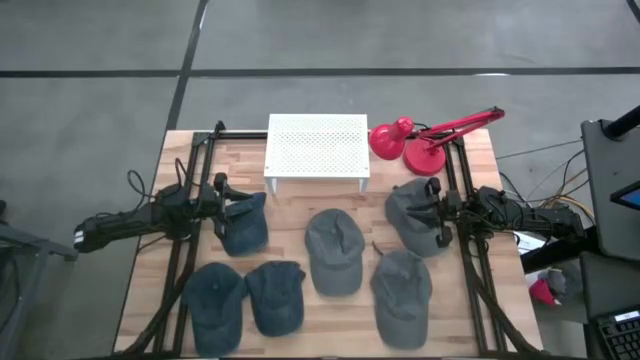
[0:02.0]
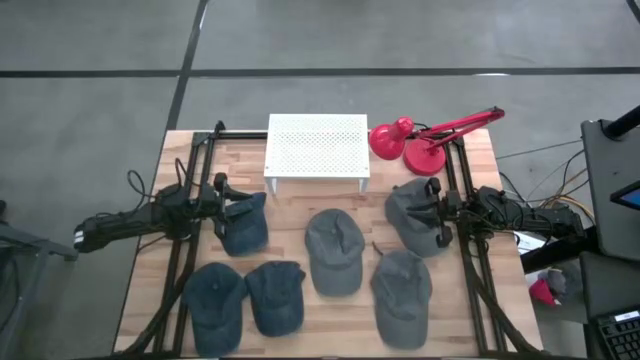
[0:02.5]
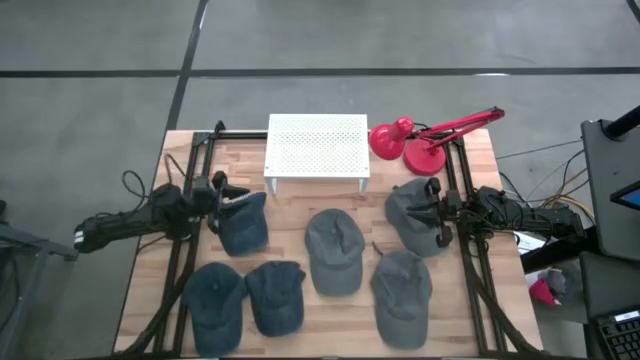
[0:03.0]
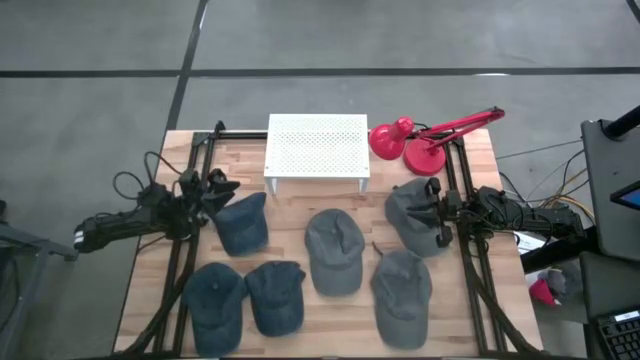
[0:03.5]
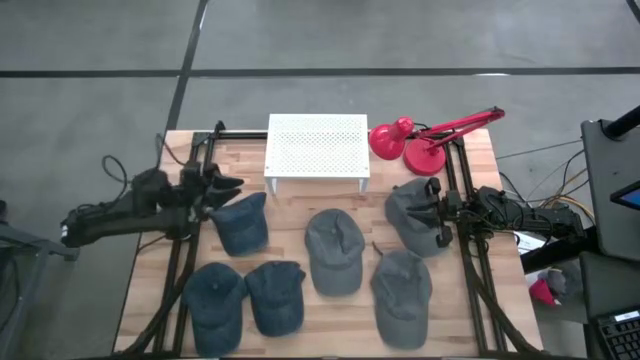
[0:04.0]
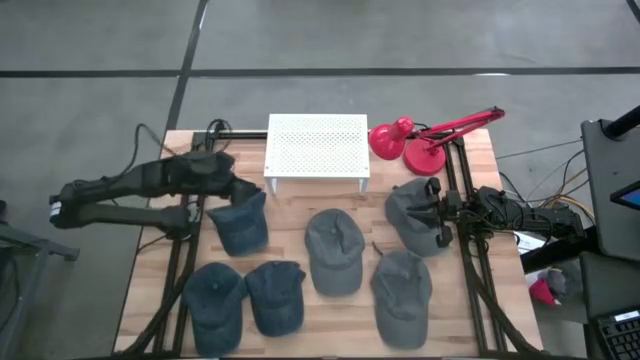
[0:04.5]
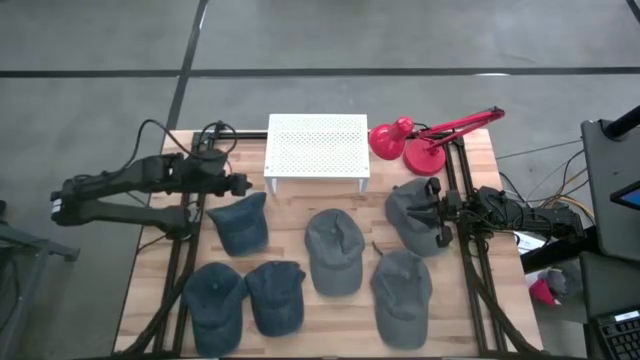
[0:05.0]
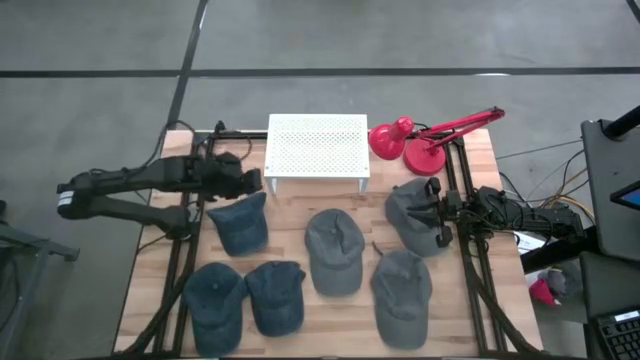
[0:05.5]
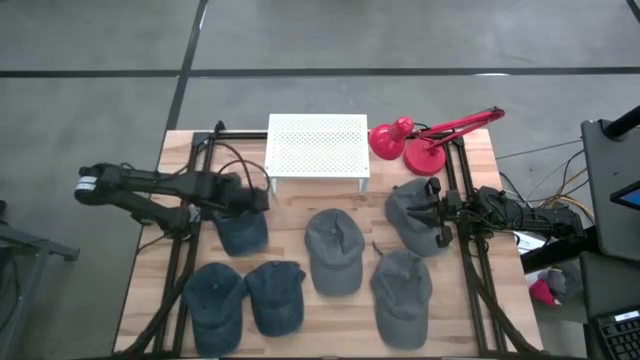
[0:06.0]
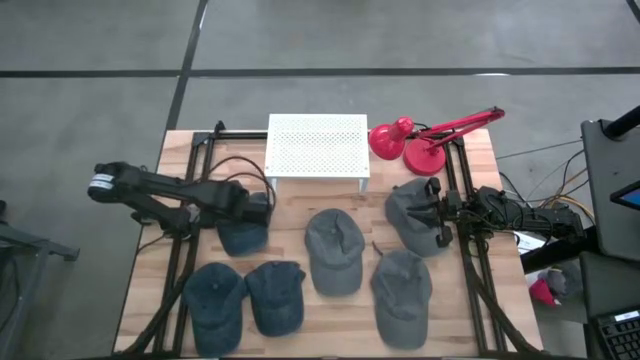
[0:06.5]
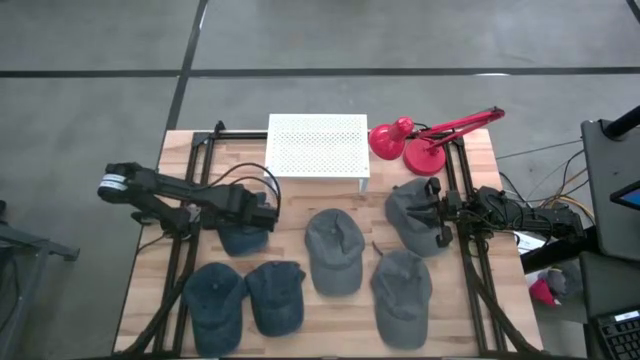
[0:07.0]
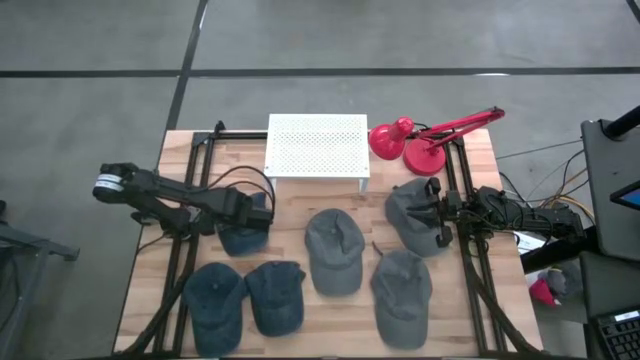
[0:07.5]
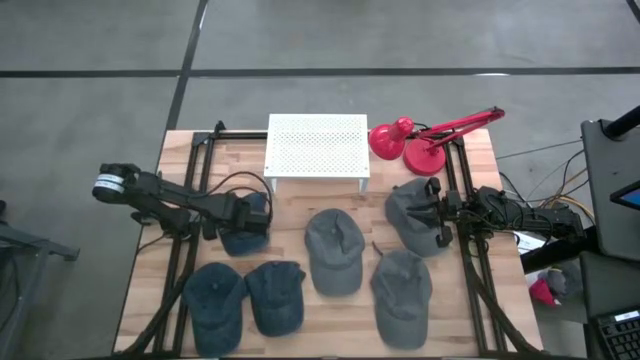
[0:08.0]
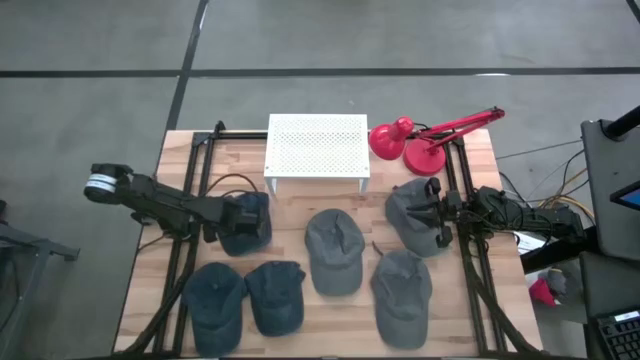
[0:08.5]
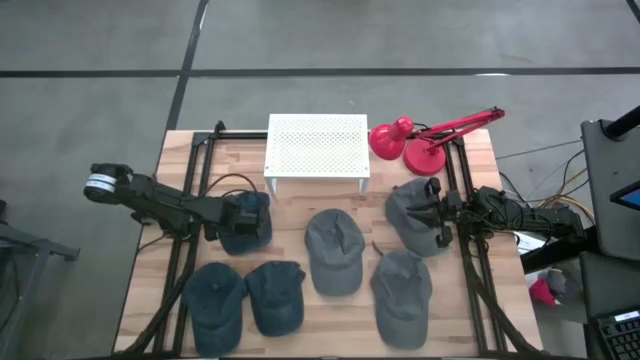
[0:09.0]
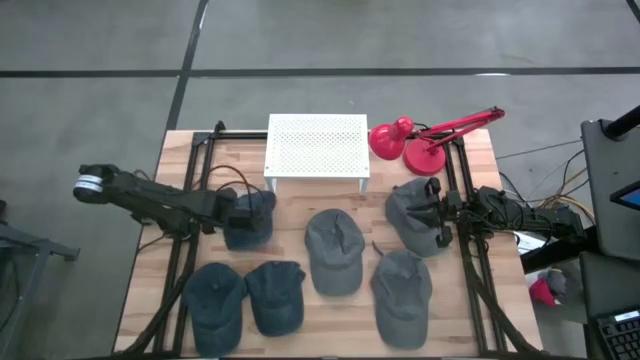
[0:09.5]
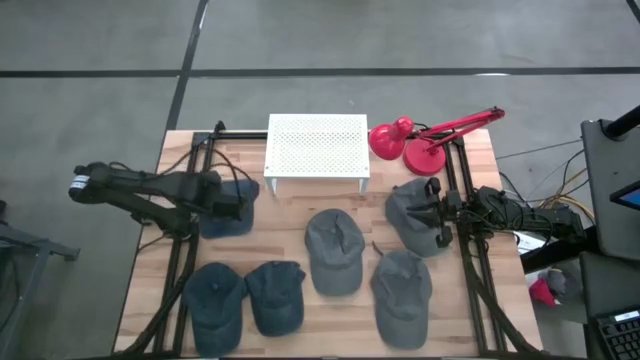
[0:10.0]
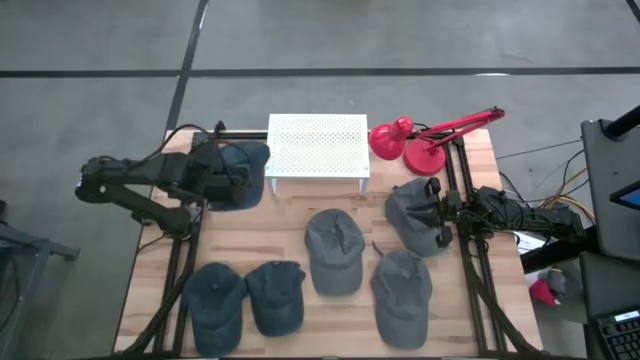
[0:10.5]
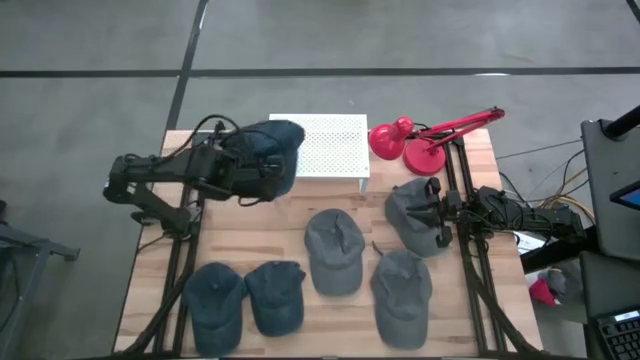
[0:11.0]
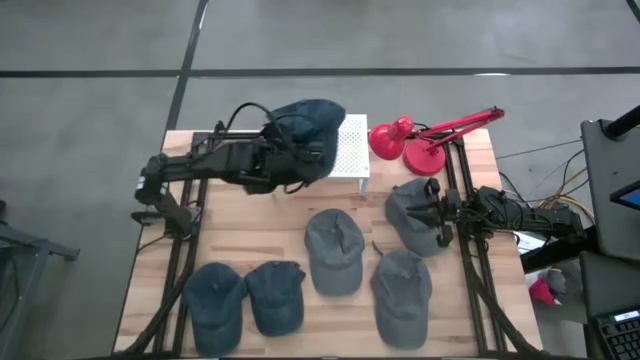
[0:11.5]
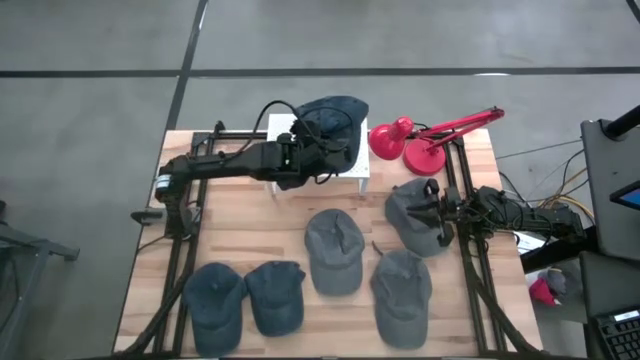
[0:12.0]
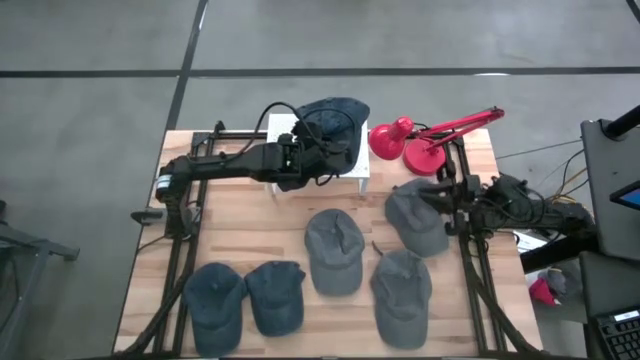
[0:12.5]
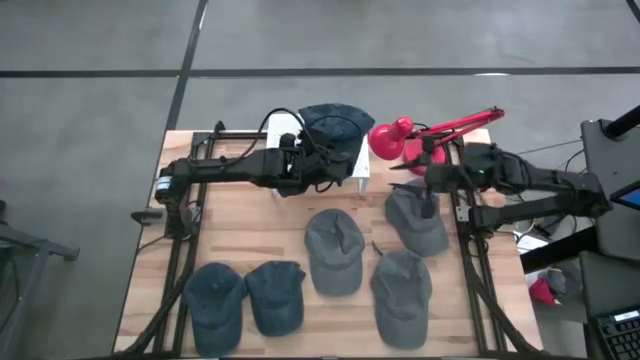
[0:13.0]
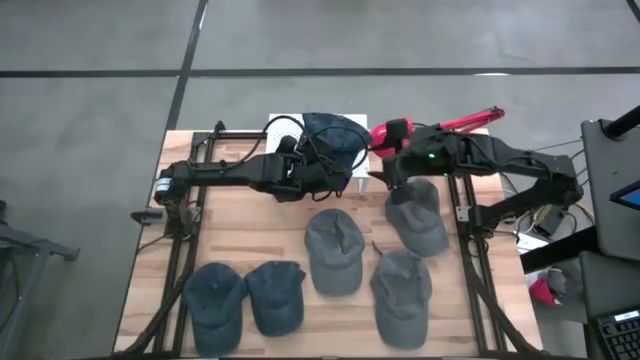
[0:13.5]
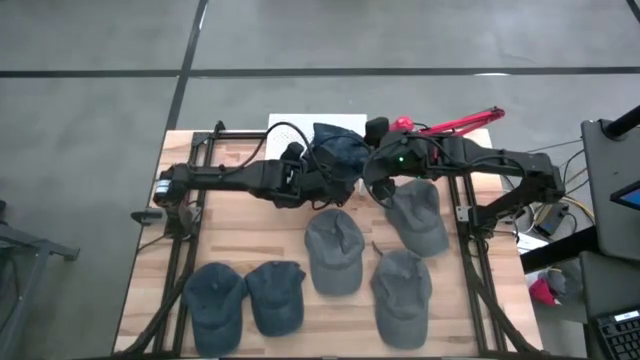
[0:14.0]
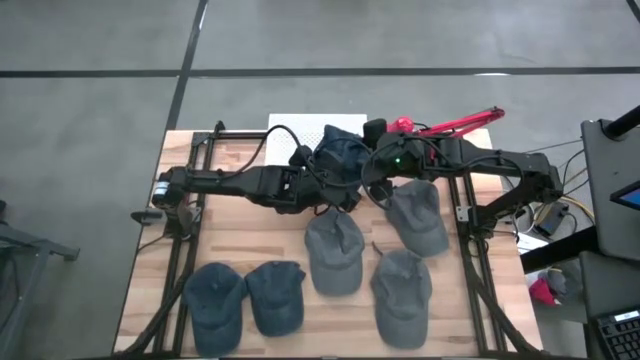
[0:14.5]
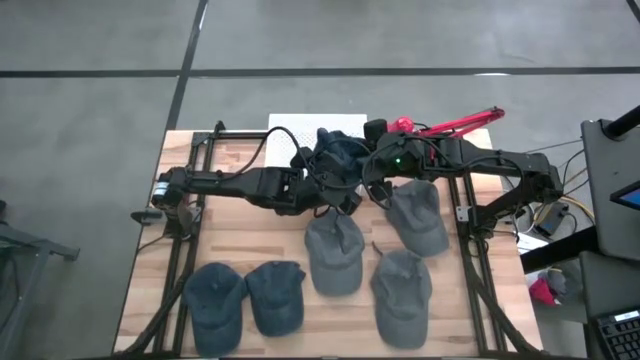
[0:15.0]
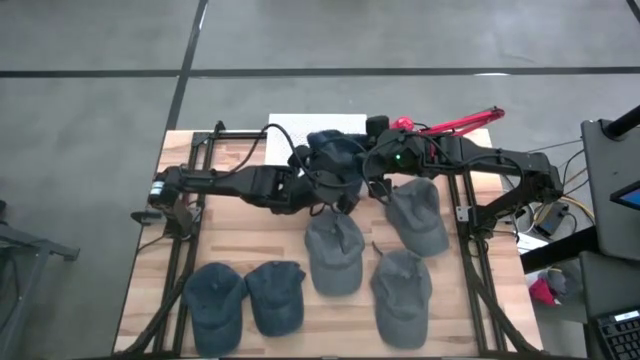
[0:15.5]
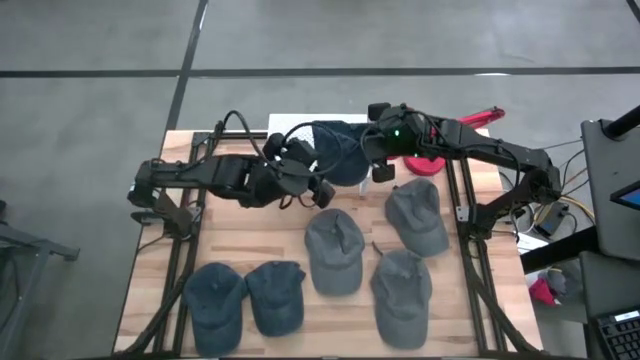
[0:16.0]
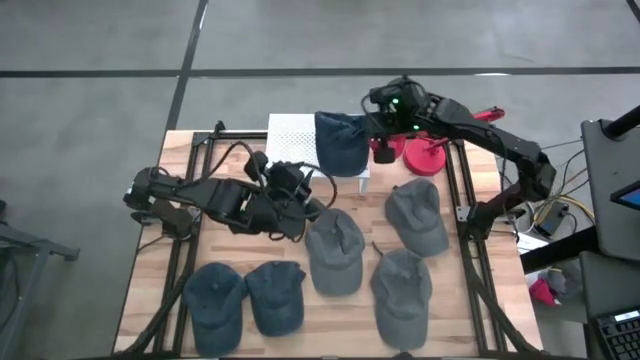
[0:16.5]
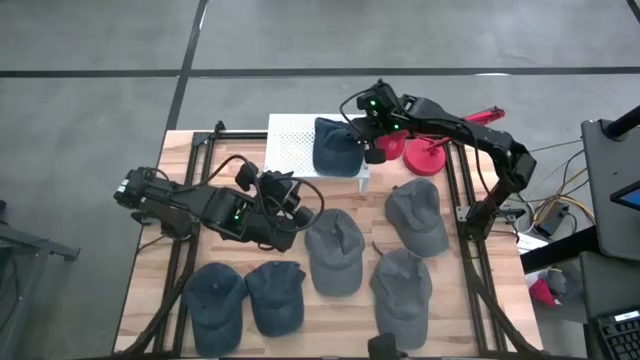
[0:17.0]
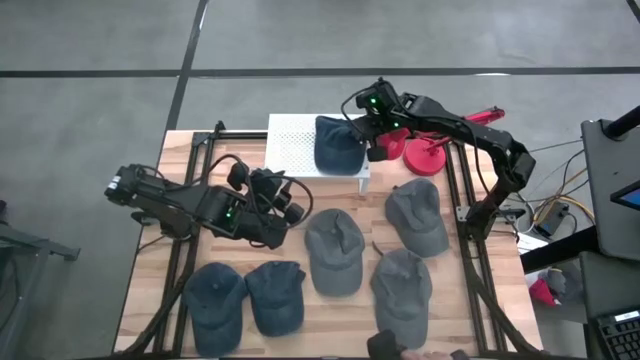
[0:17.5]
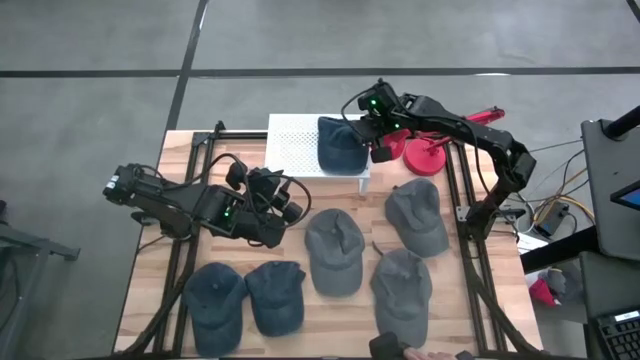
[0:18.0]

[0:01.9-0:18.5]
Task: Pick & Place hat
Put the top blue cap on the shelf
